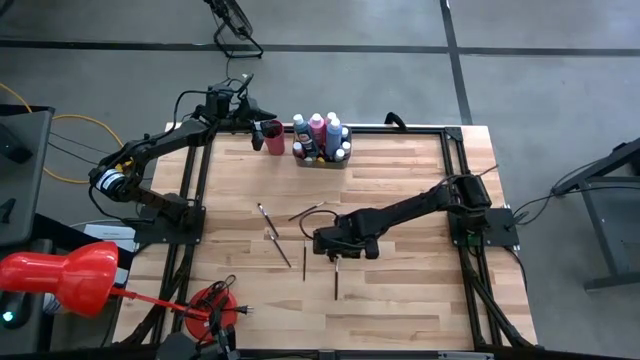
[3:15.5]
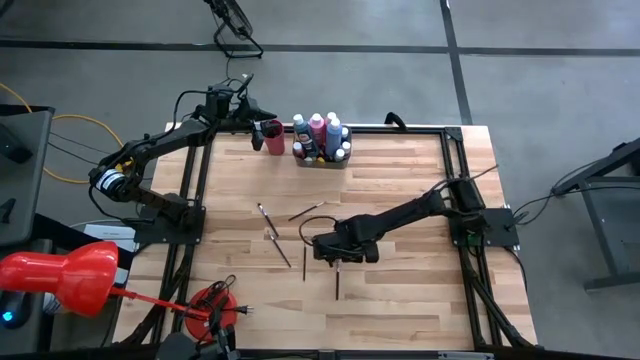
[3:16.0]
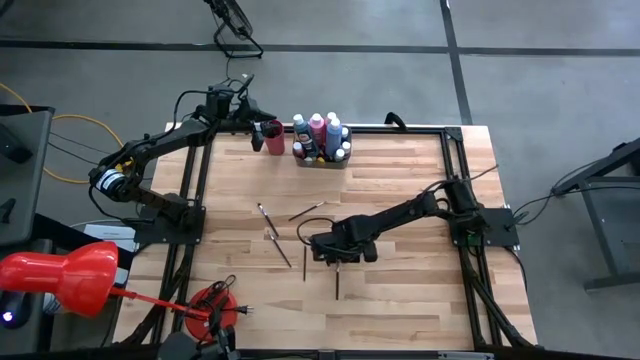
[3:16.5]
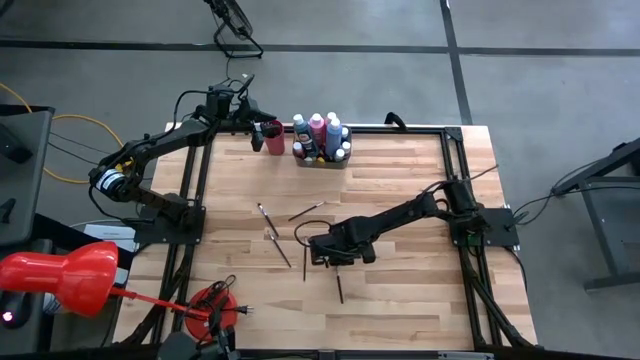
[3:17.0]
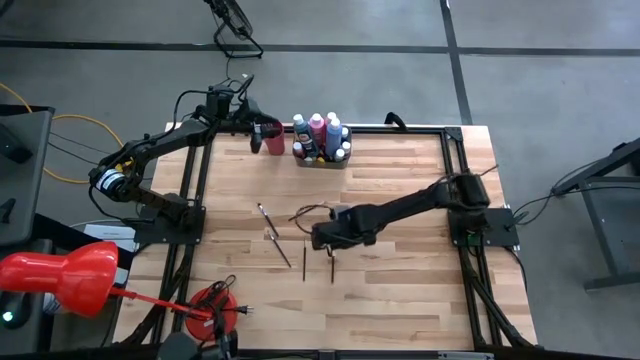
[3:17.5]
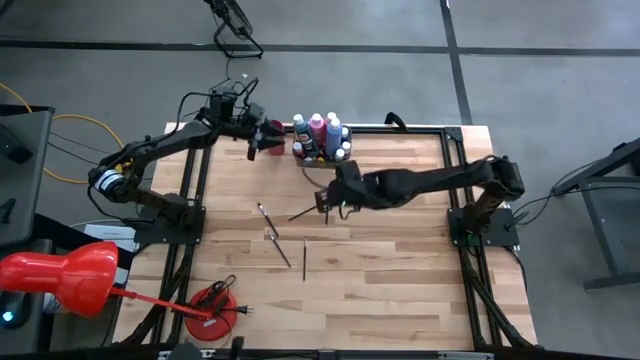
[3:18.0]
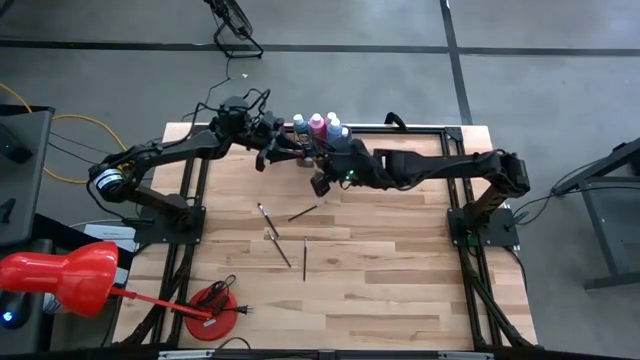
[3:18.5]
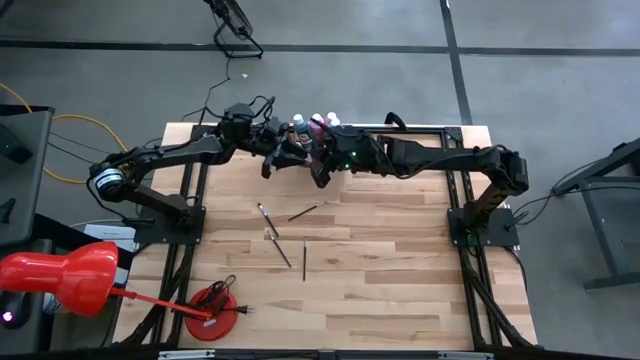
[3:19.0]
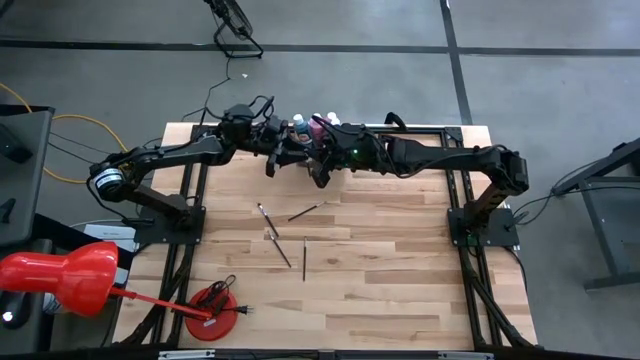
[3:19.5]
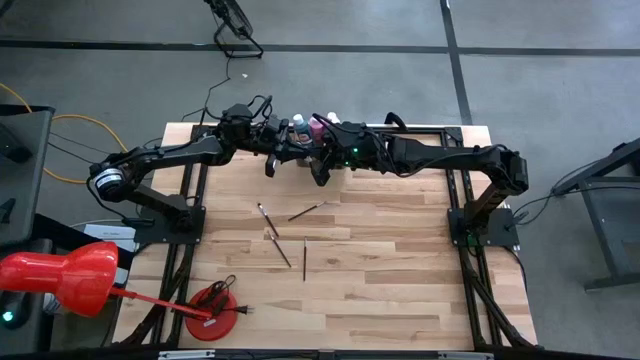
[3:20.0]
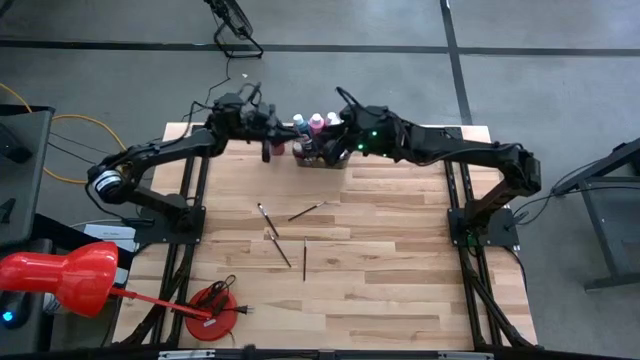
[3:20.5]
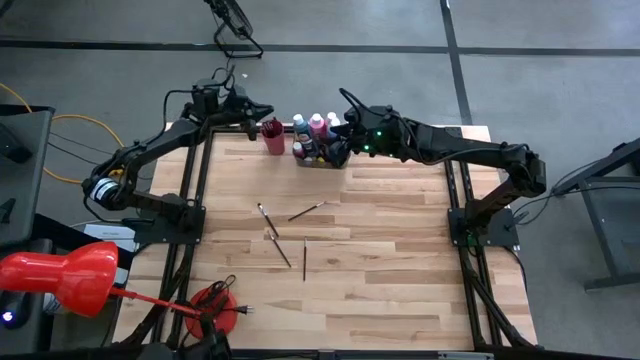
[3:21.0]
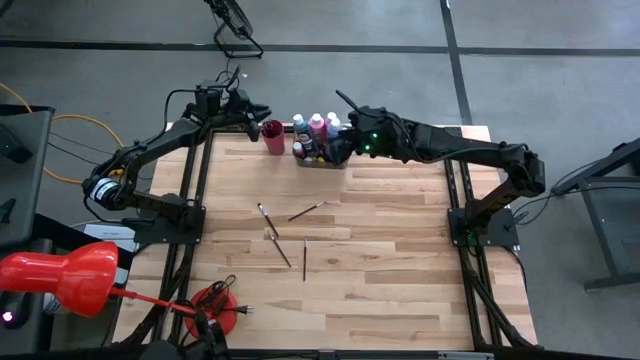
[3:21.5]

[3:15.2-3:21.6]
Task: Pick & Place Paint Supplies
Put the black paint brush into the pink cup

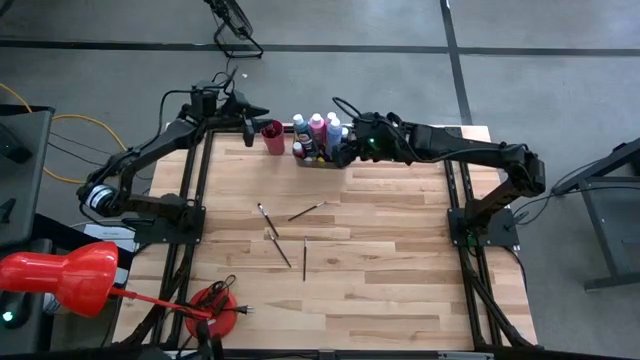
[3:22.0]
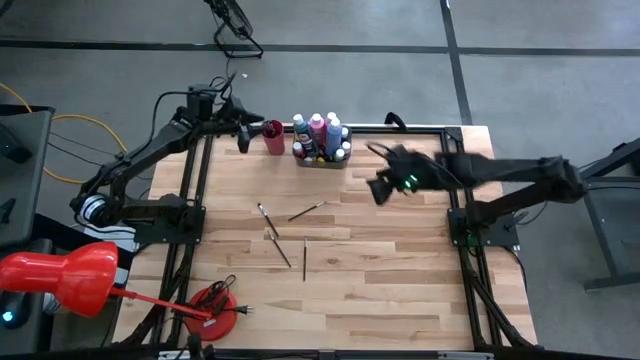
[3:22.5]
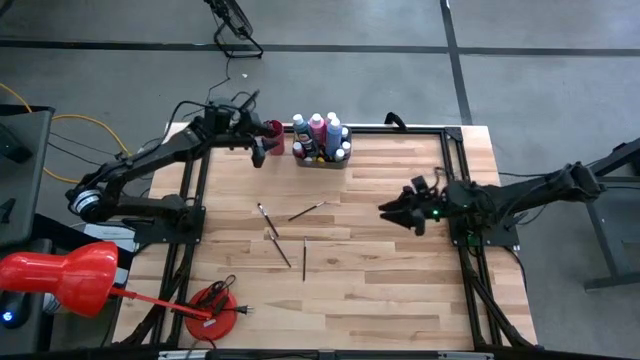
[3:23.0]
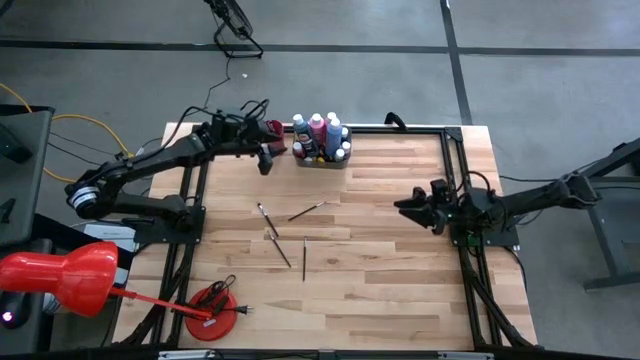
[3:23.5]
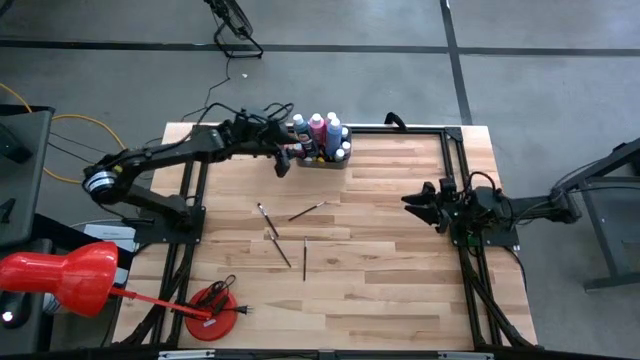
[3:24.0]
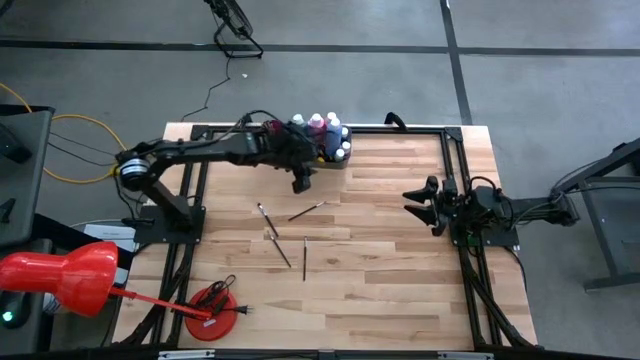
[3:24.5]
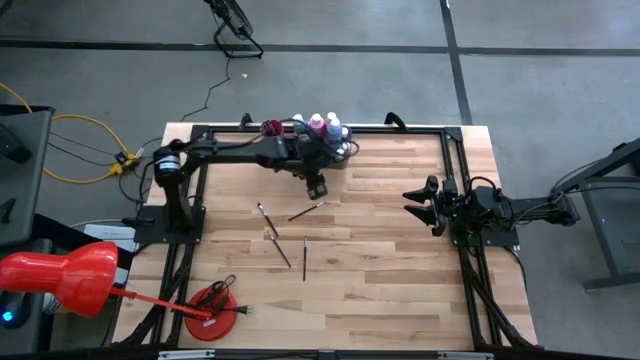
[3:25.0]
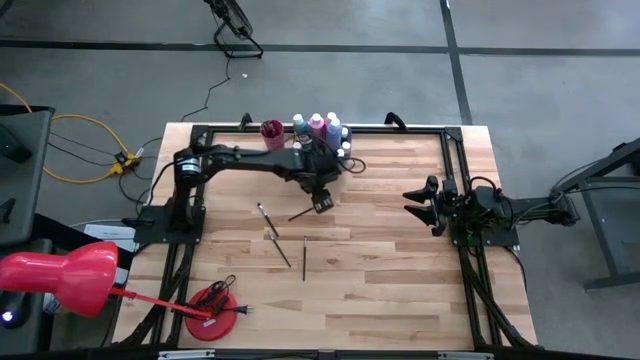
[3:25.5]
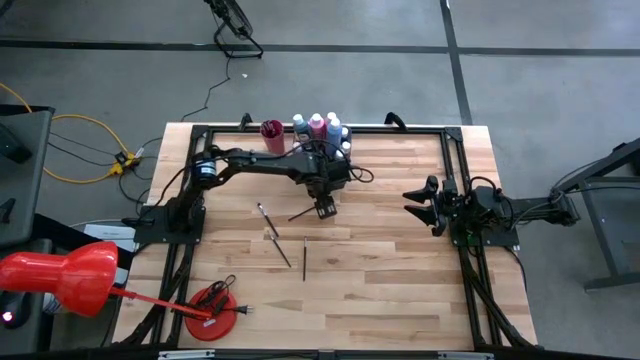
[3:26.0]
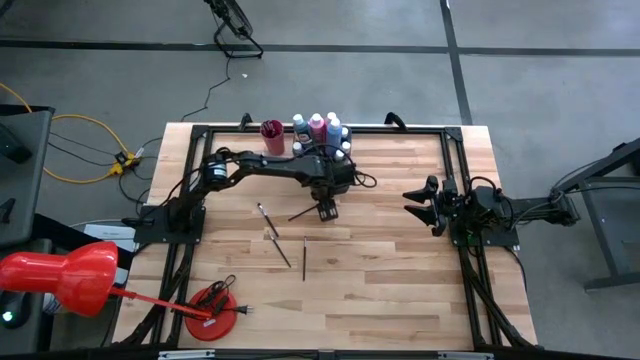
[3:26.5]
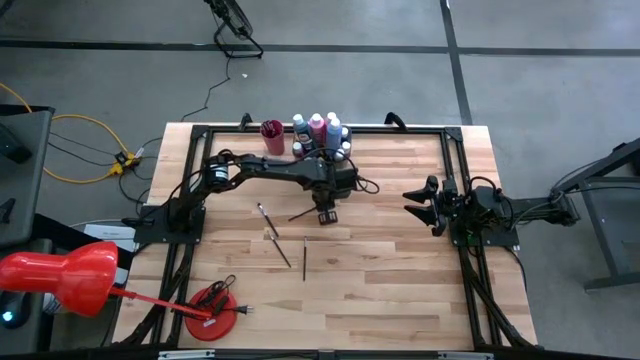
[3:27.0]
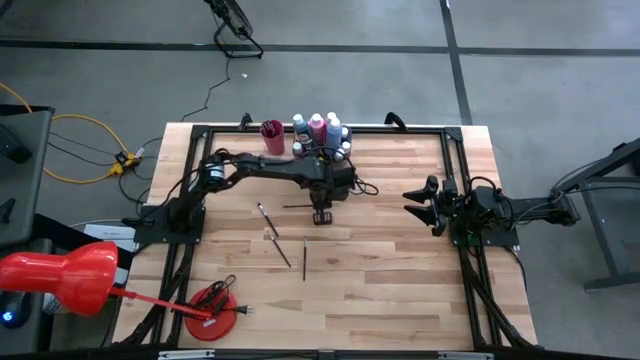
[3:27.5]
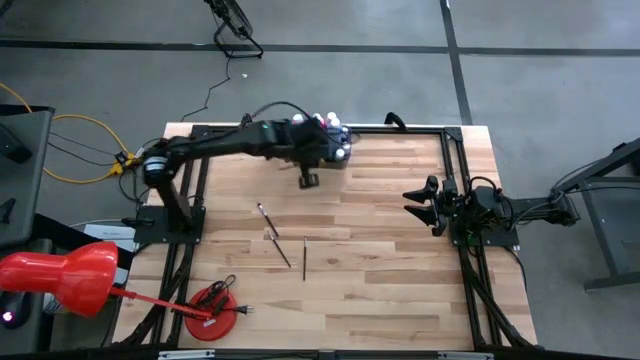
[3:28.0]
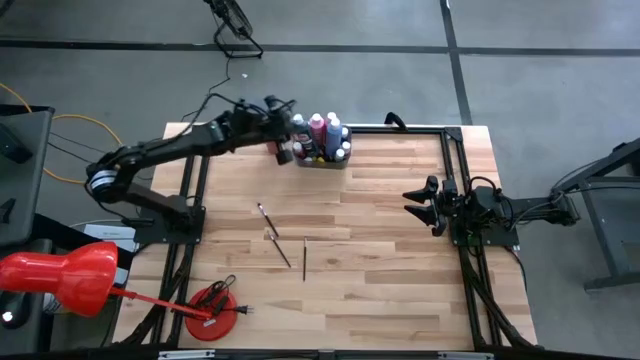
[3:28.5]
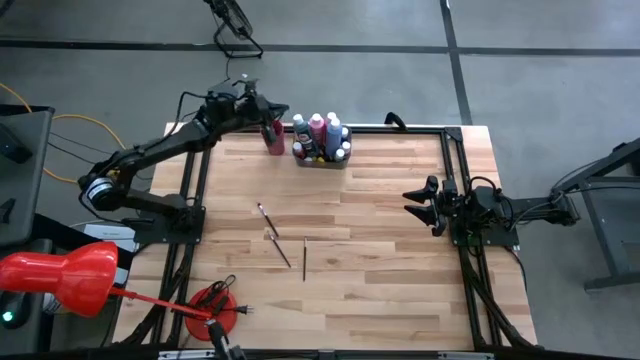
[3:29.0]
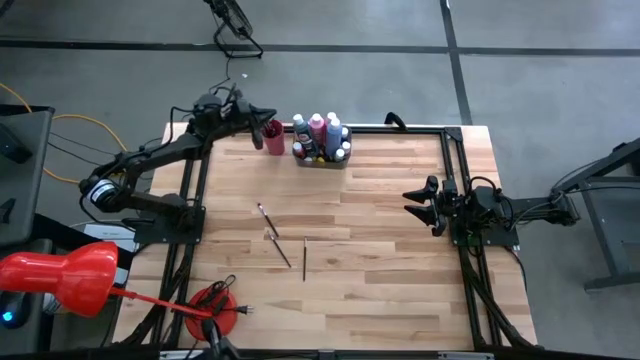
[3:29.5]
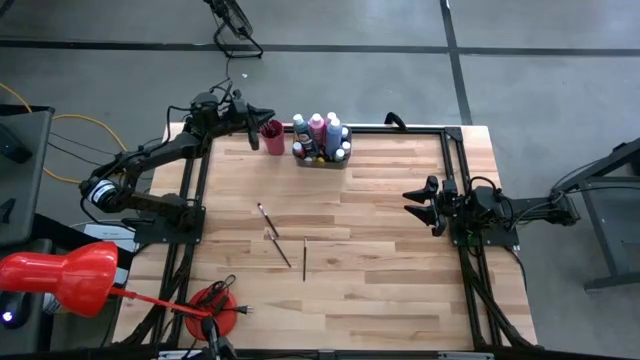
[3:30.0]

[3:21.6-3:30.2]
Put the black paint brush into the pink cup

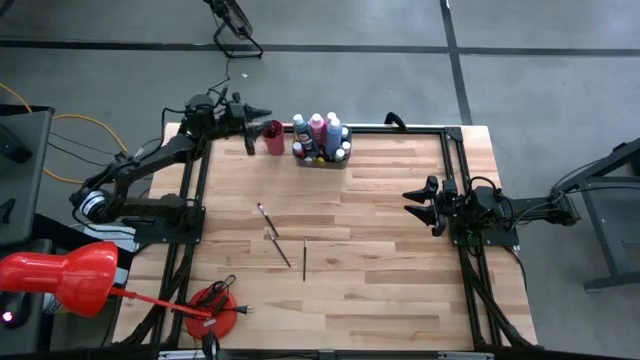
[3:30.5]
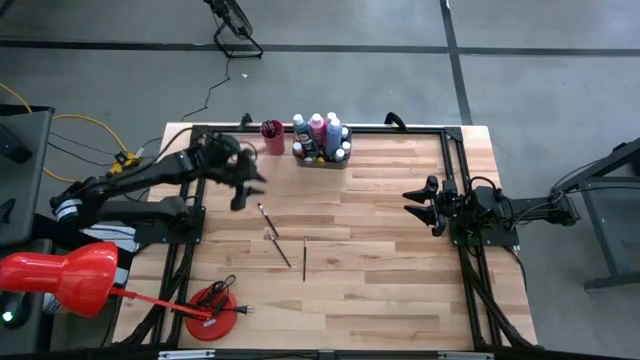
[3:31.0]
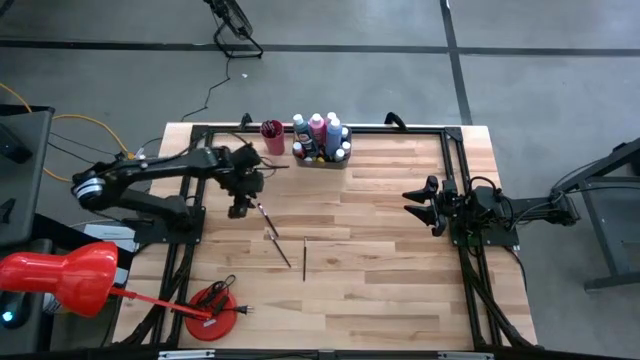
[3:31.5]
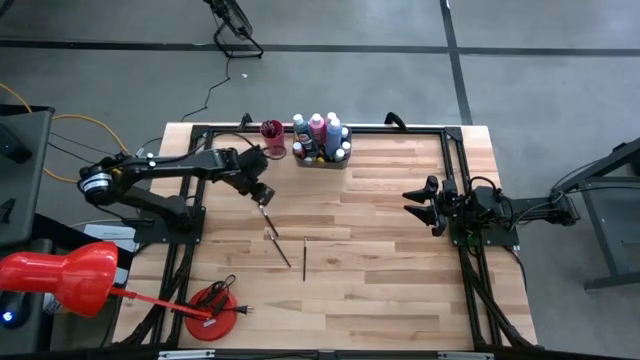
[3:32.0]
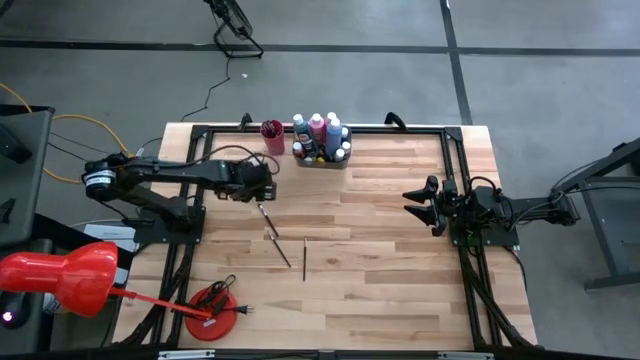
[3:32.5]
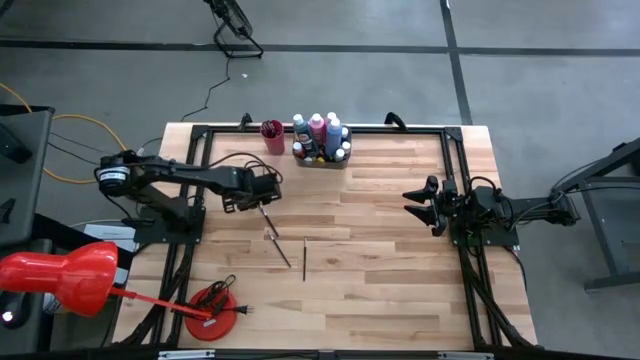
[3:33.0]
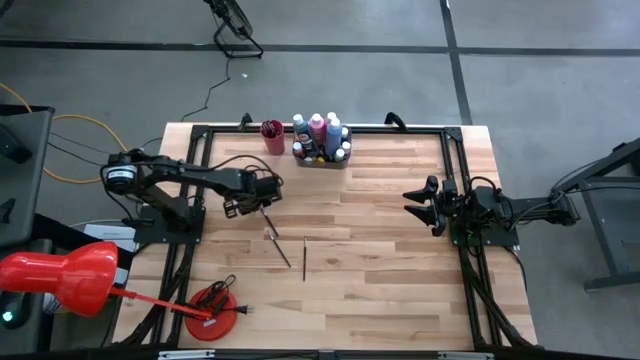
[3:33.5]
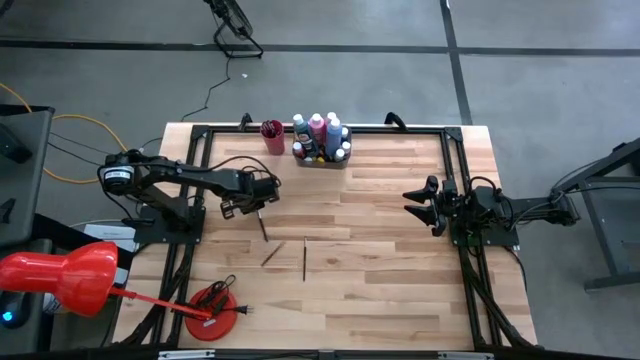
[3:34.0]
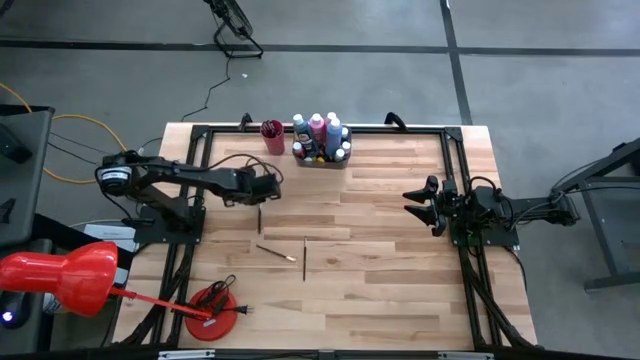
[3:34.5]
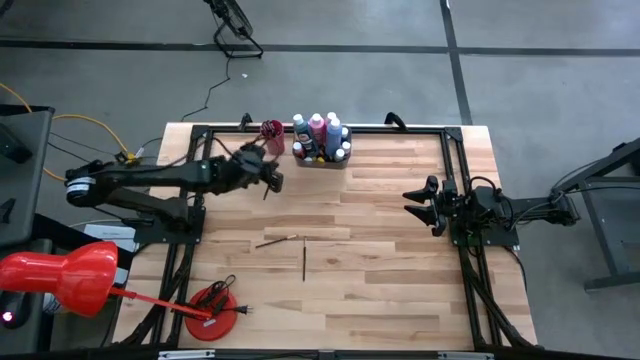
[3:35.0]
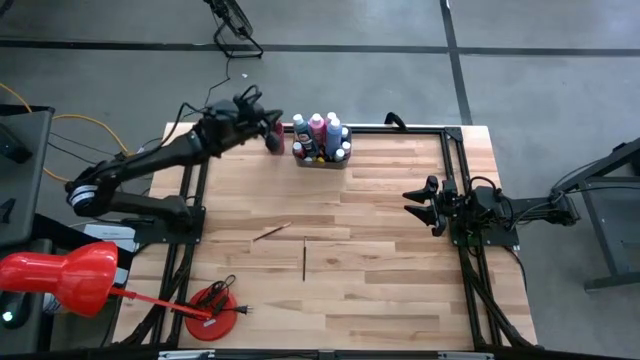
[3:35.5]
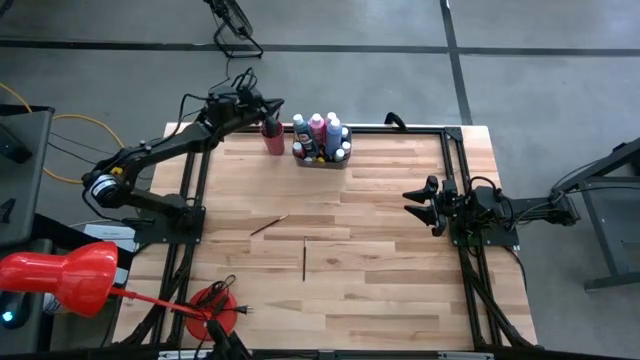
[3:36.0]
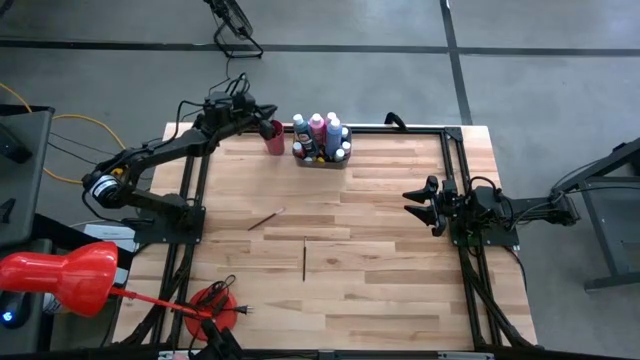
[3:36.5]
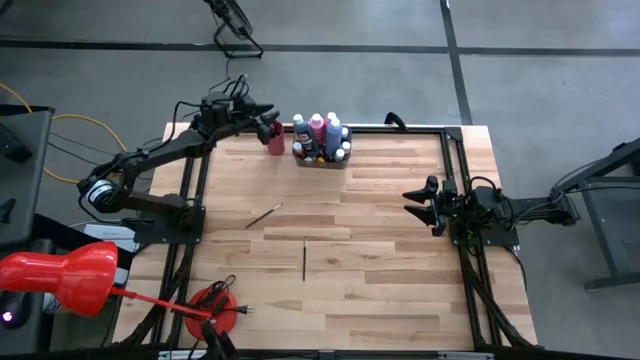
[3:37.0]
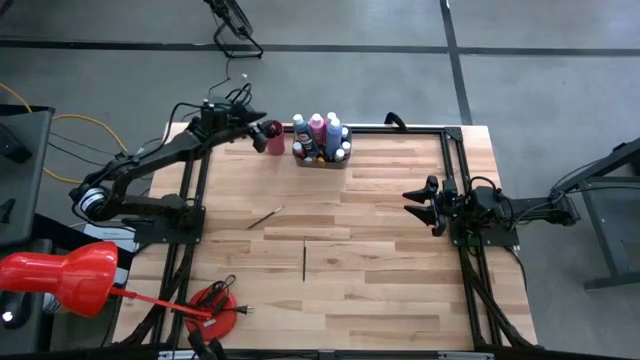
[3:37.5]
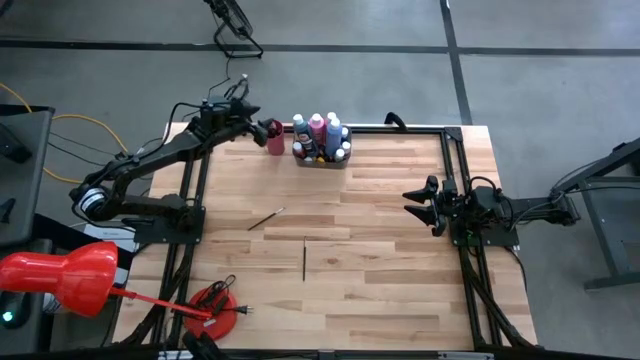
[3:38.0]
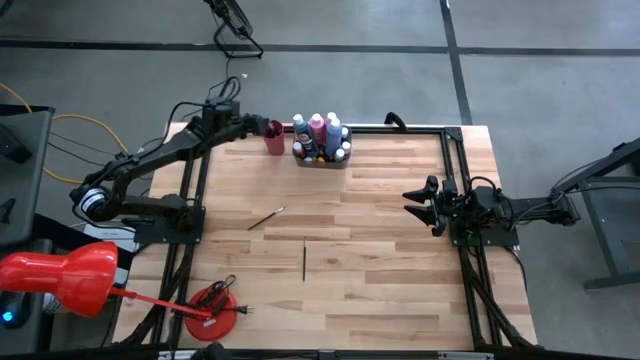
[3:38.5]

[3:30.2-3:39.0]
Put the black paint brush into the pink cup
